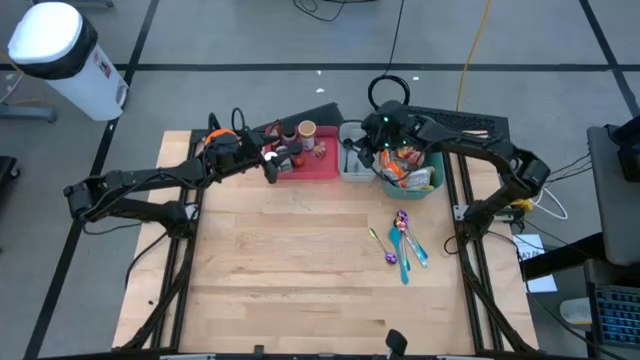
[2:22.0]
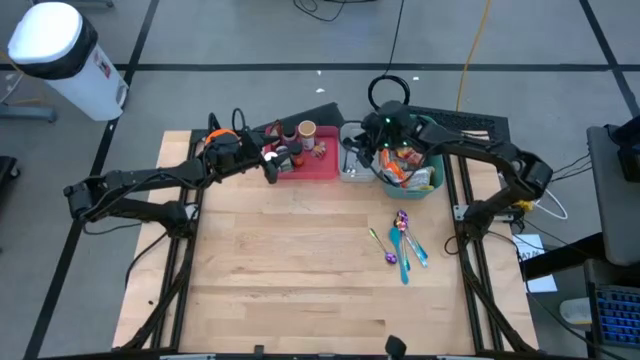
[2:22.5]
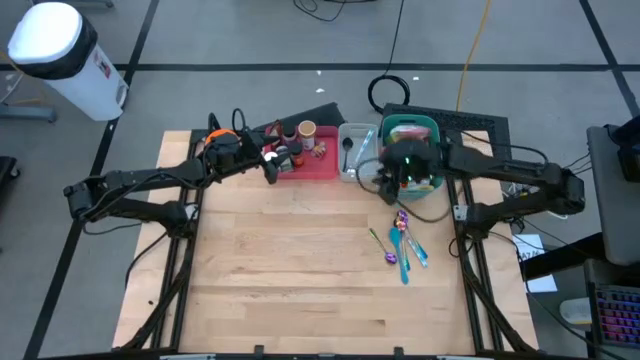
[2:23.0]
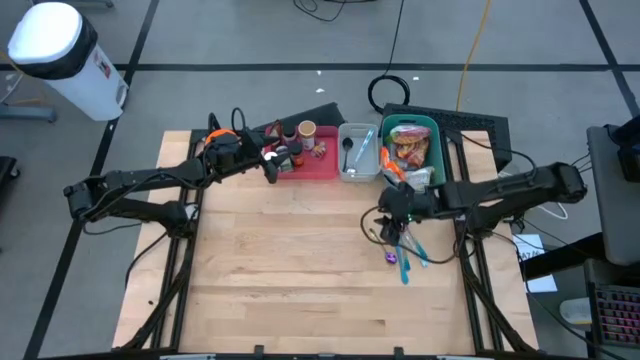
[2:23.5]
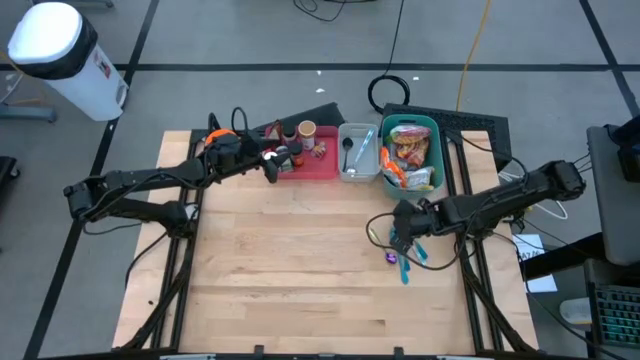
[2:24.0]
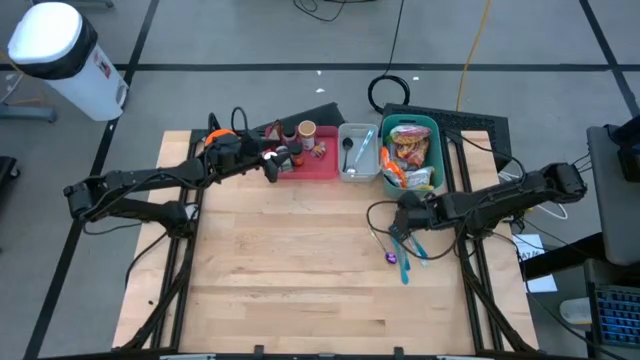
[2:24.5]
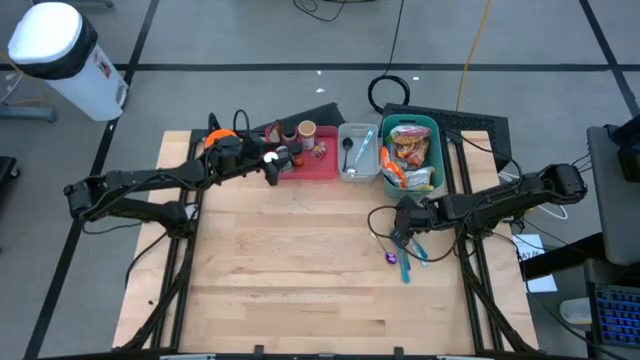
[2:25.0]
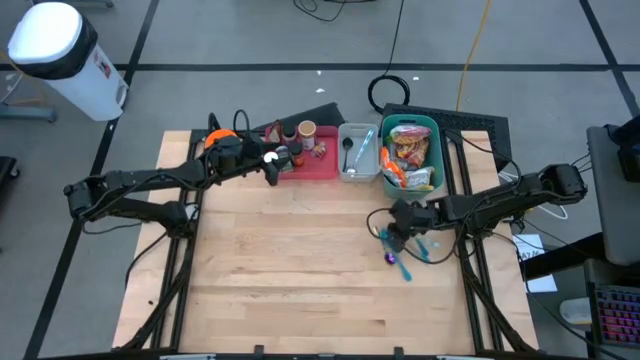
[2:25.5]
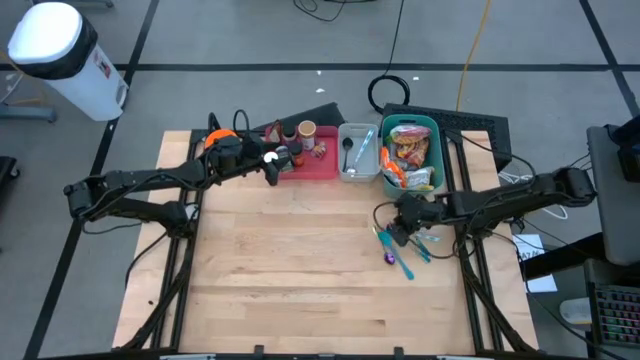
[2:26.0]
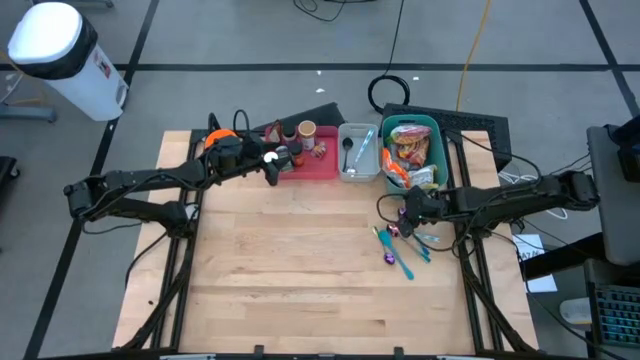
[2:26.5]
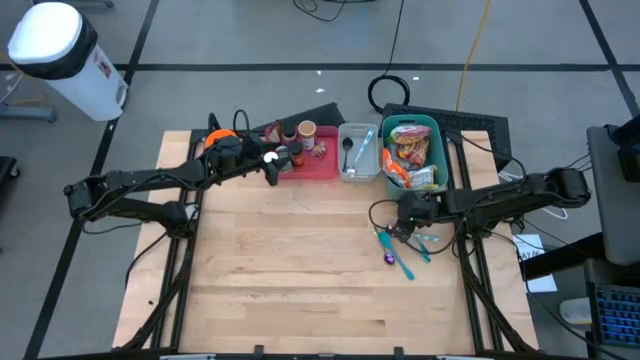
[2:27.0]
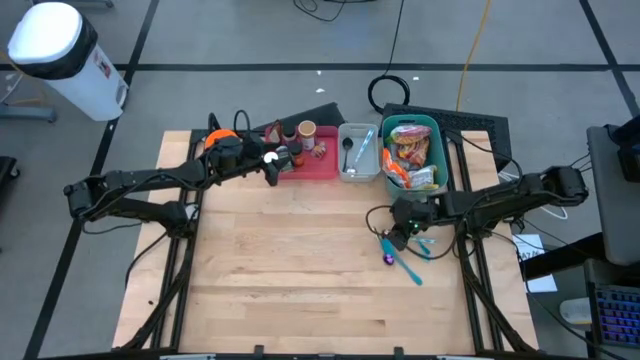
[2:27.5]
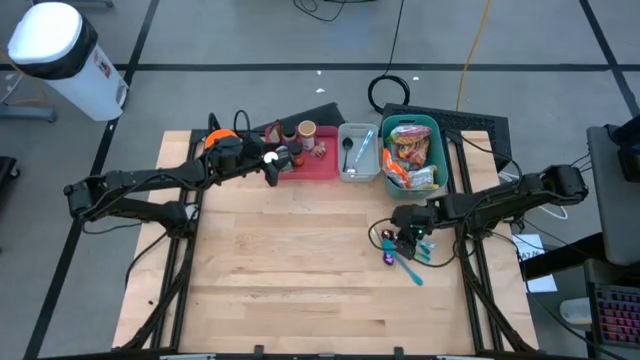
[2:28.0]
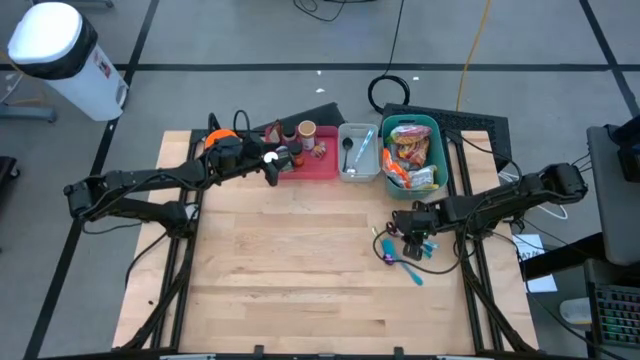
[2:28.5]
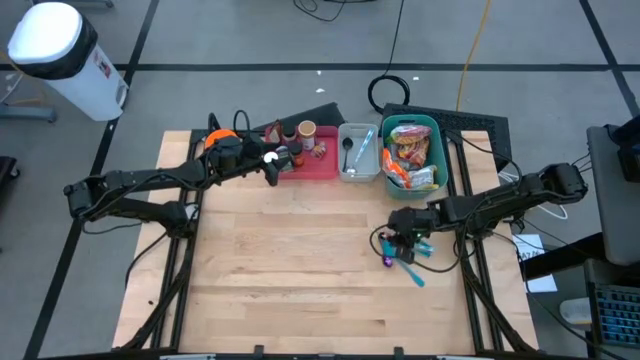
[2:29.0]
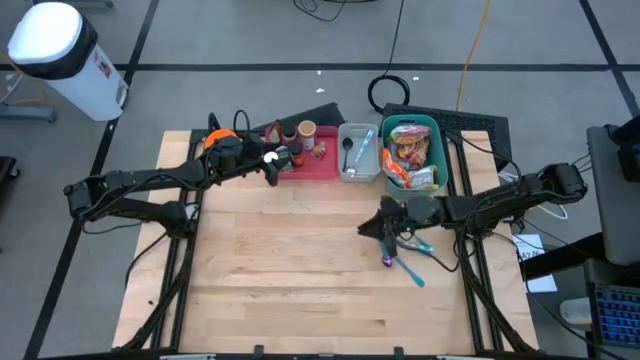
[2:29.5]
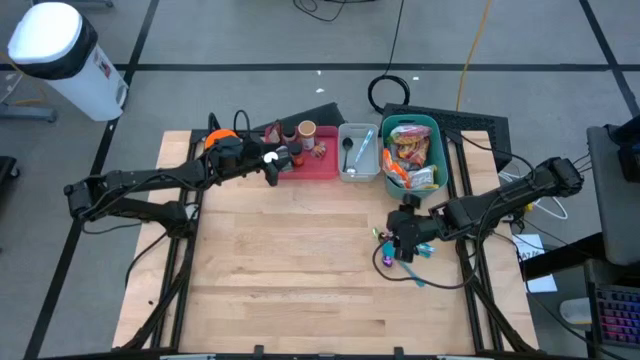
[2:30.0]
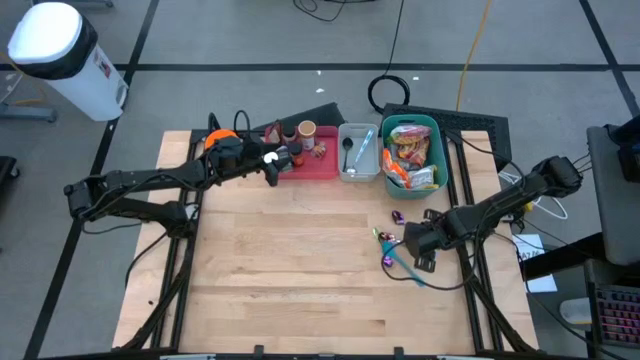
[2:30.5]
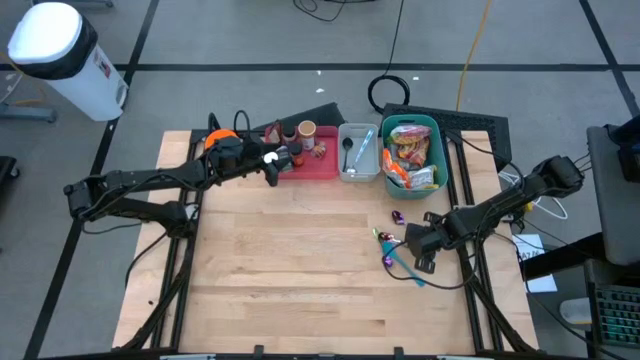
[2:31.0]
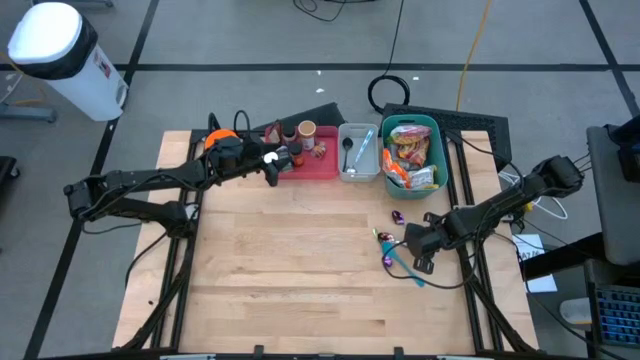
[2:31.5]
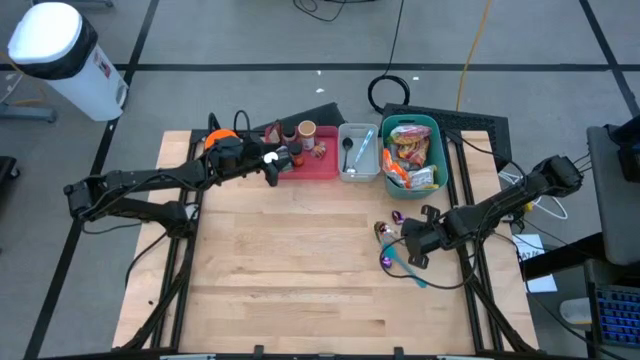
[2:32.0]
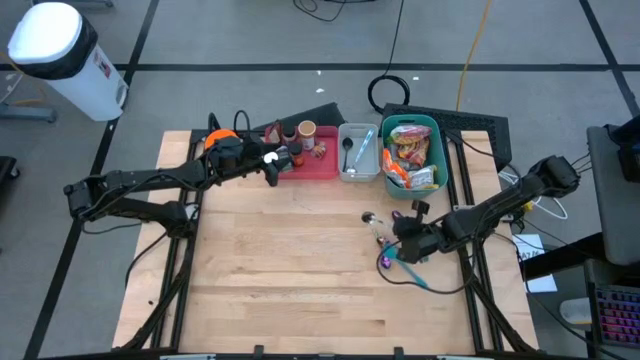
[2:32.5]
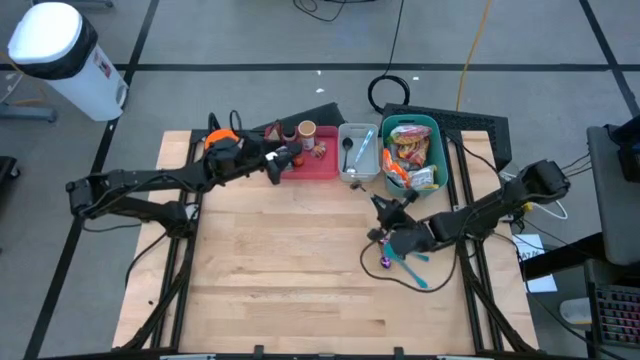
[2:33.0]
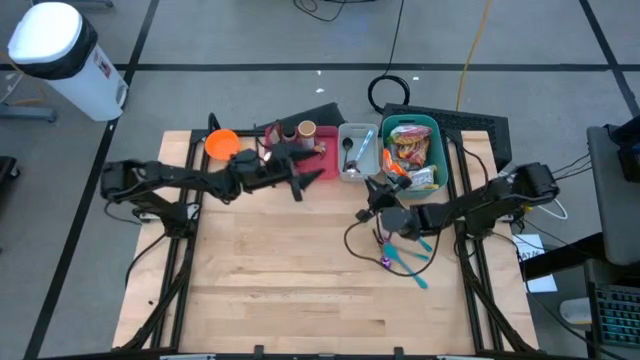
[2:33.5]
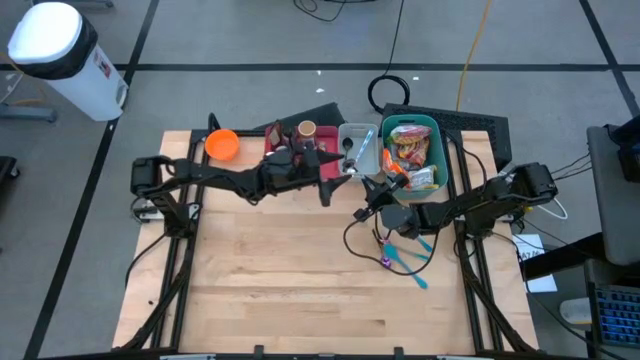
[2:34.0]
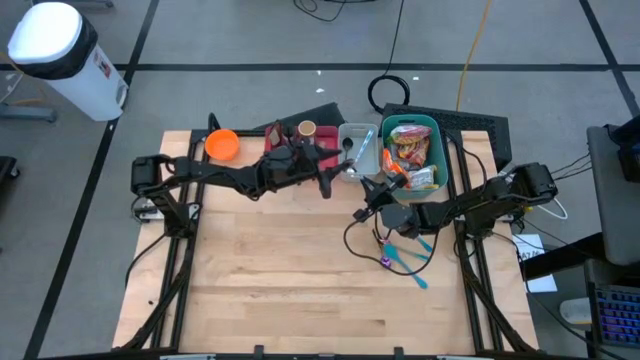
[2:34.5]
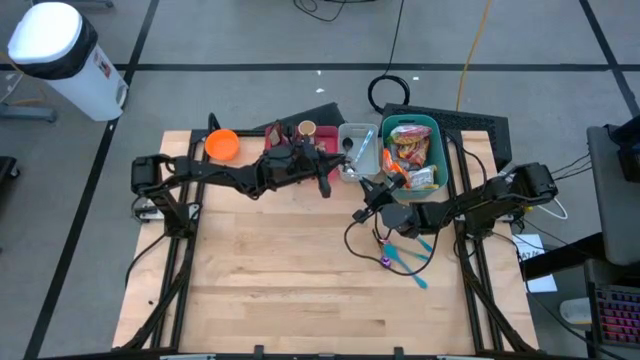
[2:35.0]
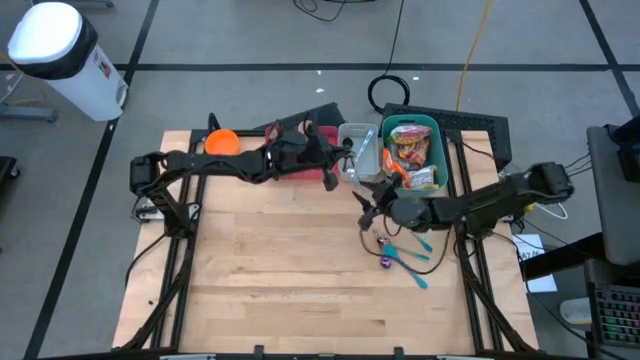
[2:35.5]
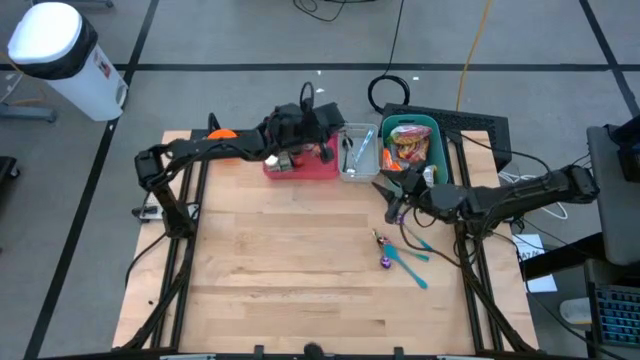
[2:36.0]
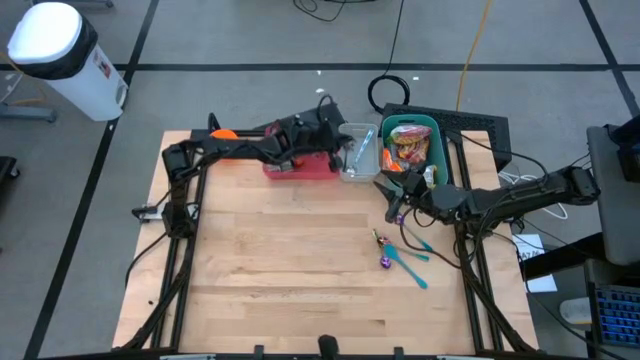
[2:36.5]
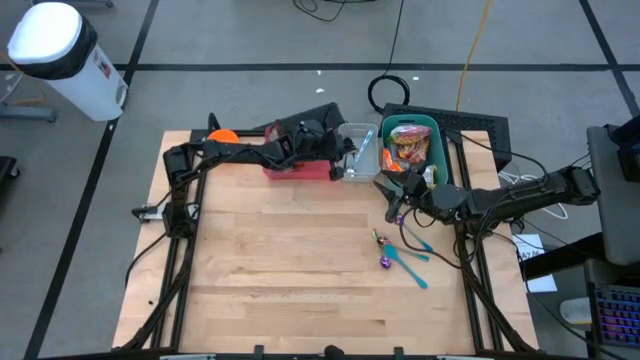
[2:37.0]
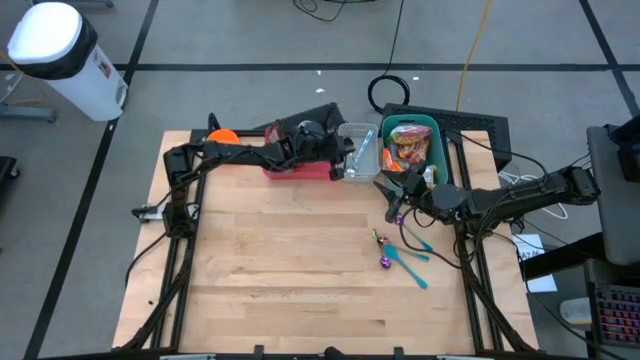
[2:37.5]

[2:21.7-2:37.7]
Task: Pick & Place Food Item
Put the white and blue spoon into the white bin
